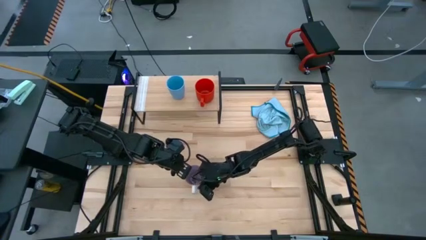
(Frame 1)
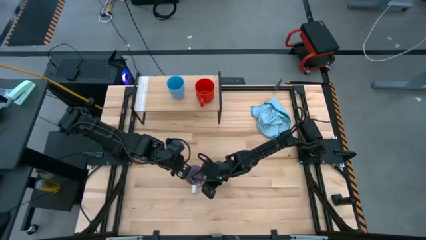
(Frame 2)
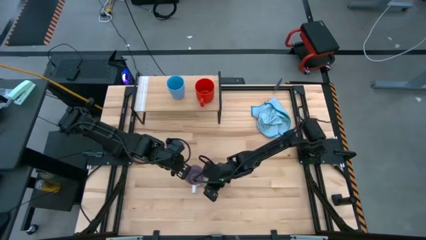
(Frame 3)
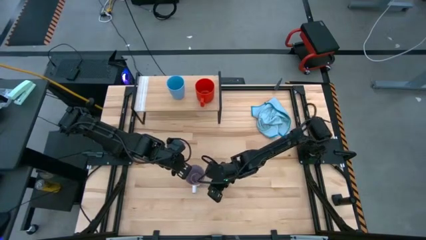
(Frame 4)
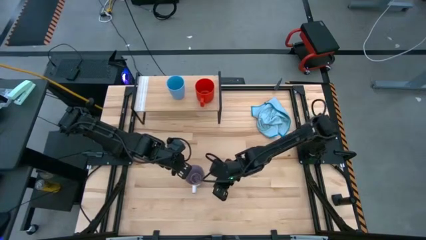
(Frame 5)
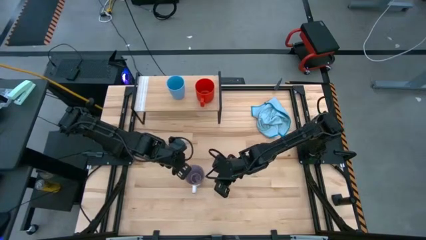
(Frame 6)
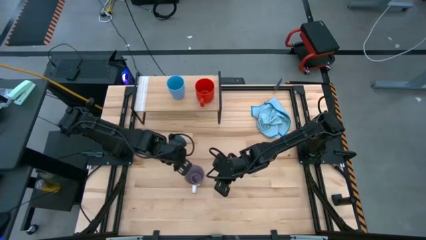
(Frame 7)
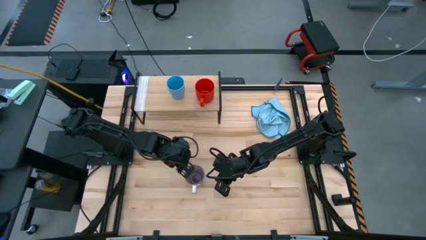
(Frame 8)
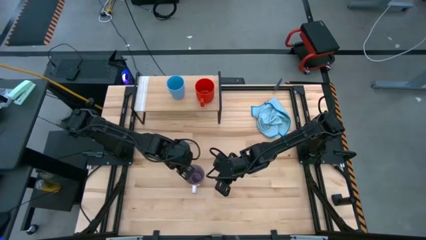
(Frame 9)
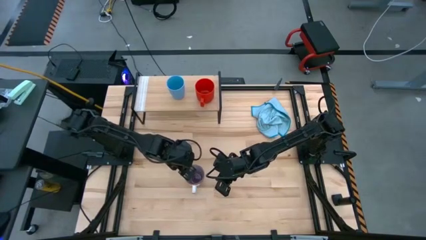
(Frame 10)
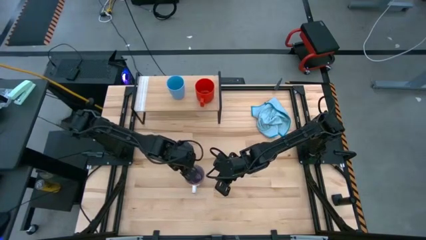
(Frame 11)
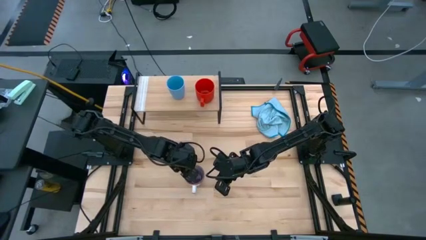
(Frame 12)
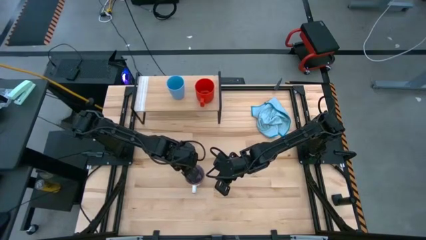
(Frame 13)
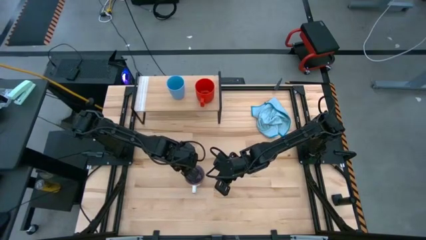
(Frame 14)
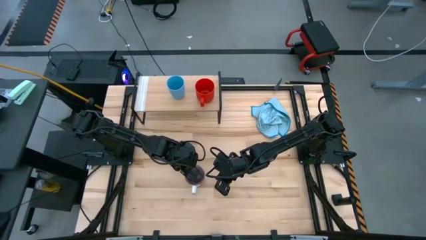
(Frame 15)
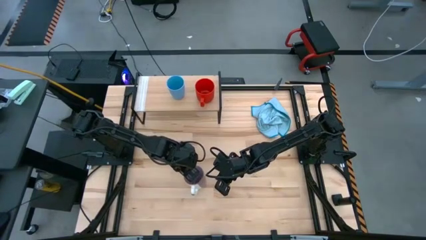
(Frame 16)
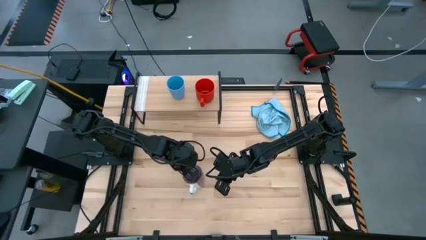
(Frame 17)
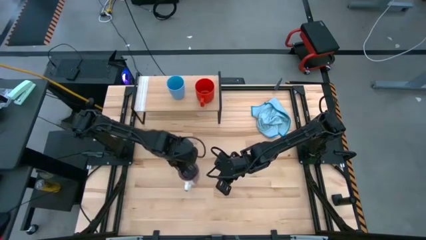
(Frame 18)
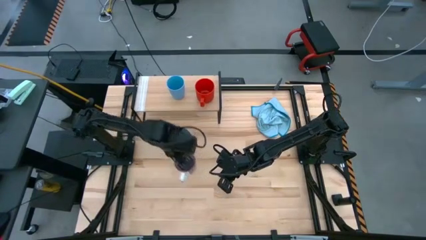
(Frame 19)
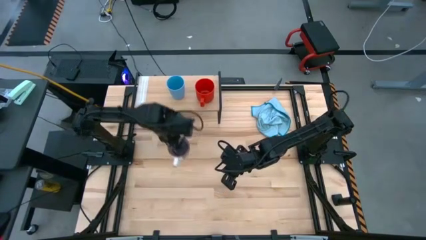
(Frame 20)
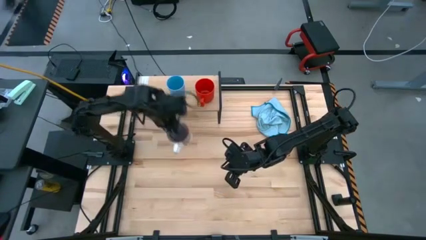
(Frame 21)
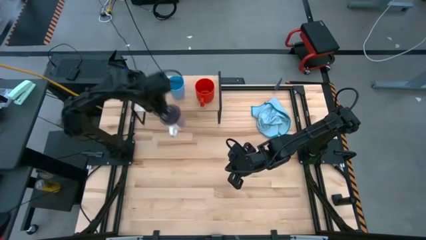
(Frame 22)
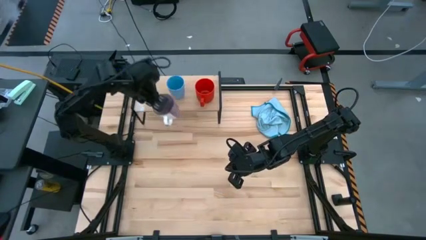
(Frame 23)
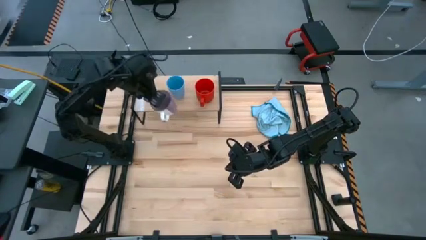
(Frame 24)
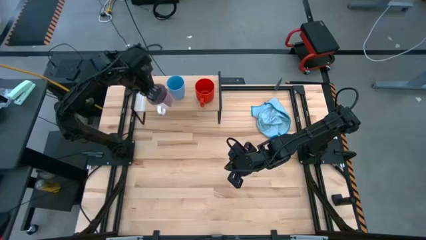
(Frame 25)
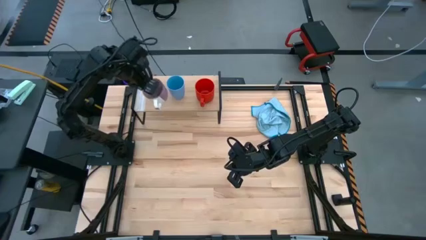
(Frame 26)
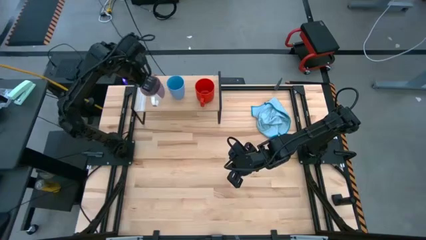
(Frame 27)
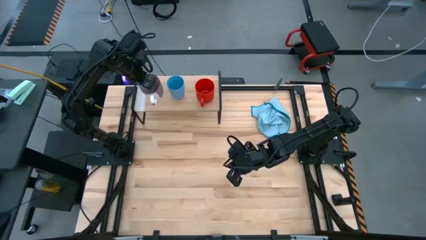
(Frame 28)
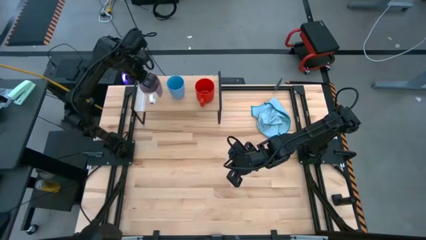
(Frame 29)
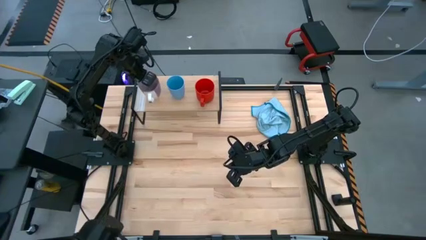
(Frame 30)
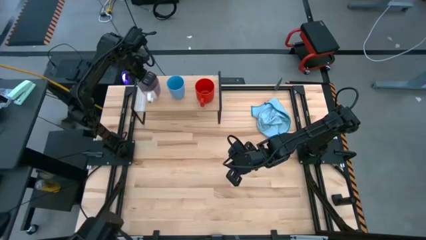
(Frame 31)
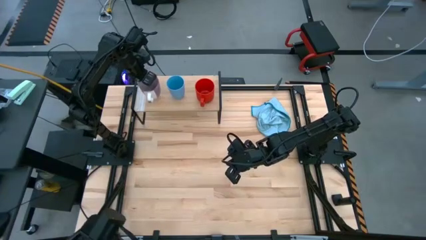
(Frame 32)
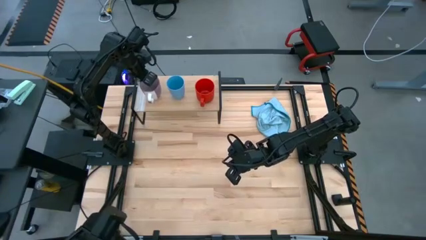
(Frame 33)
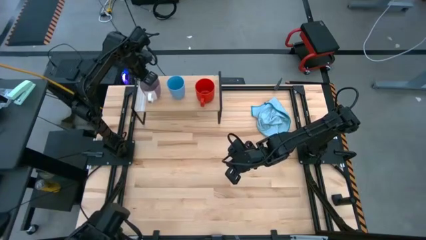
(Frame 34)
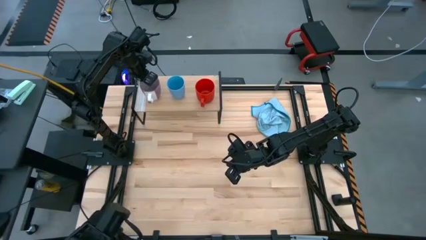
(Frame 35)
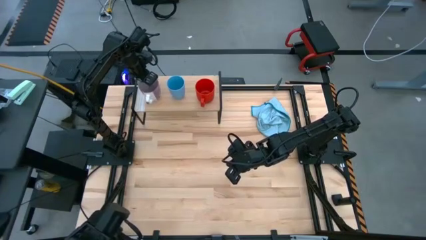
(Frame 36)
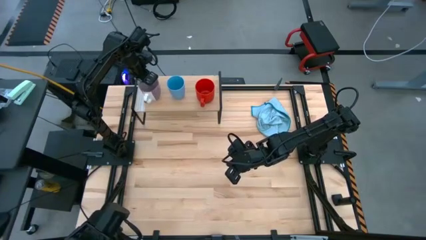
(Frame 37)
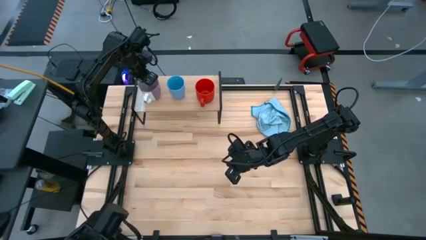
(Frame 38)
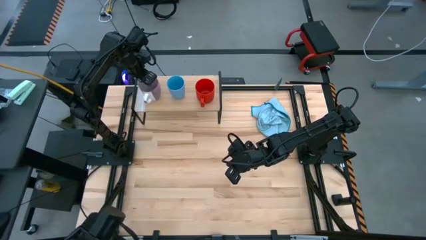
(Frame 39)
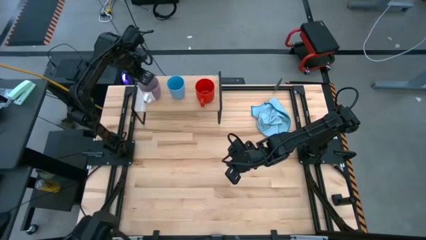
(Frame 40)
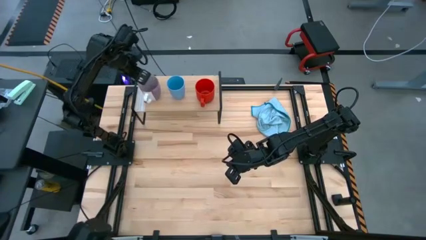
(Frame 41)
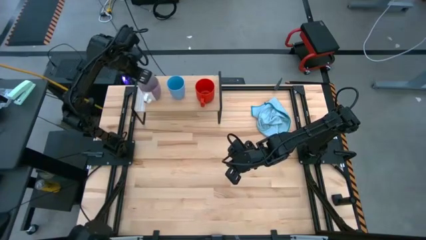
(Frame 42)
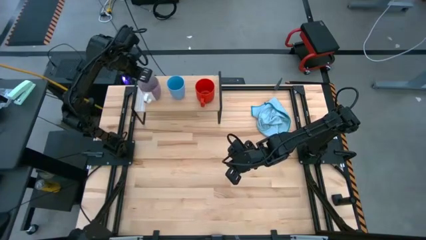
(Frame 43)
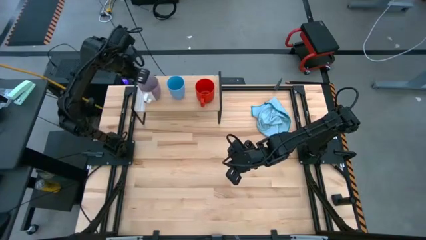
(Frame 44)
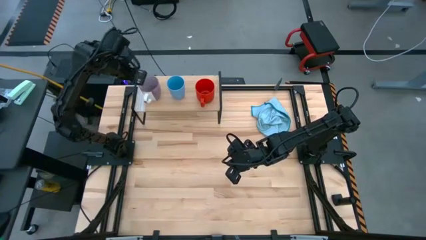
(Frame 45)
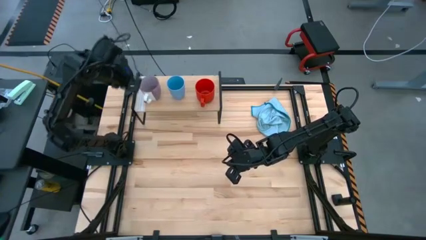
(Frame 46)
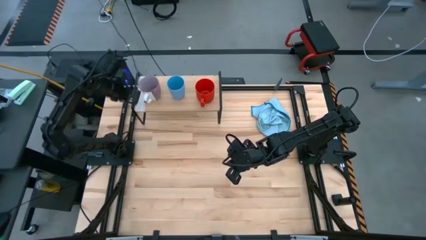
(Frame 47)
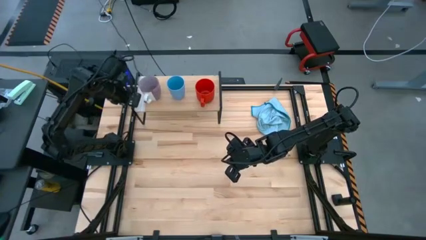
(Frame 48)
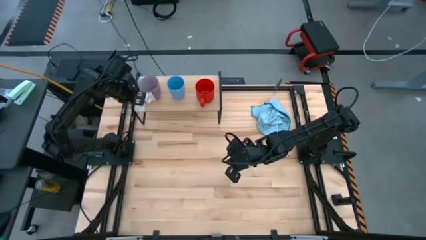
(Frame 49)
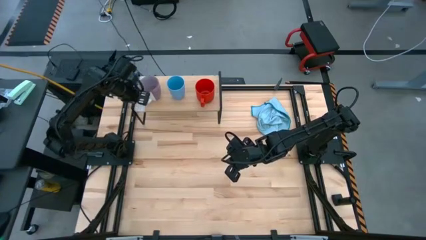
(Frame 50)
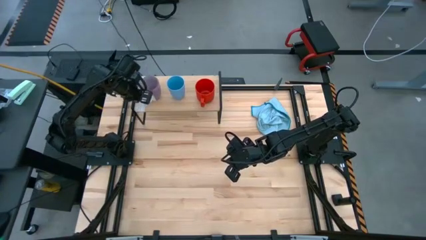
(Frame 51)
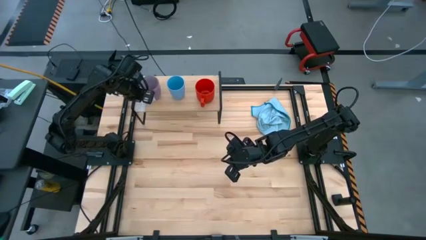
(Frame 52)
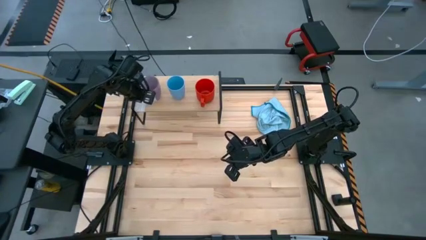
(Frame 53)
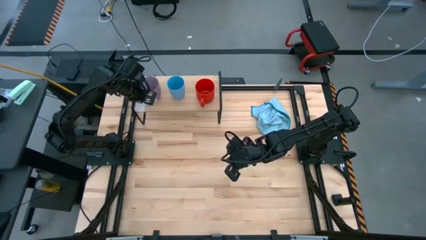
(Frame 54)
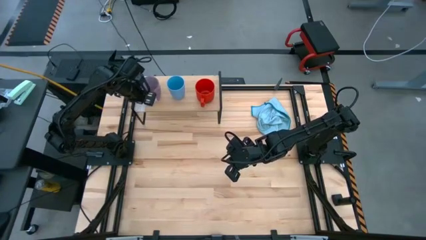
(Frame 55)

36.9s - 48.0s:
Task: Stack small to large cups/mugs on shelf
Put the purple cup on the shelf
